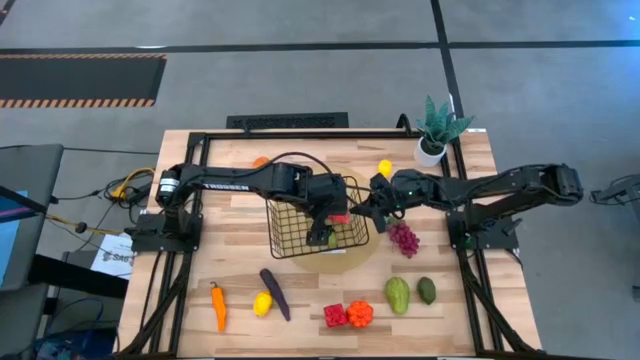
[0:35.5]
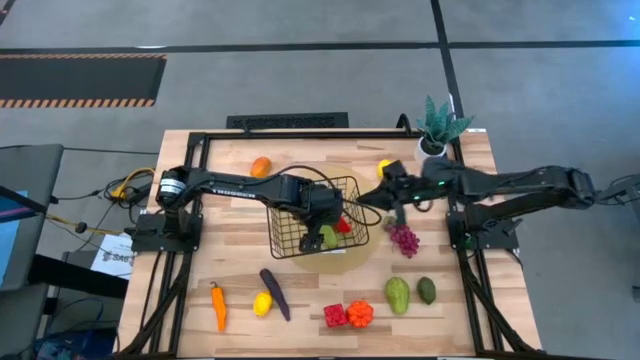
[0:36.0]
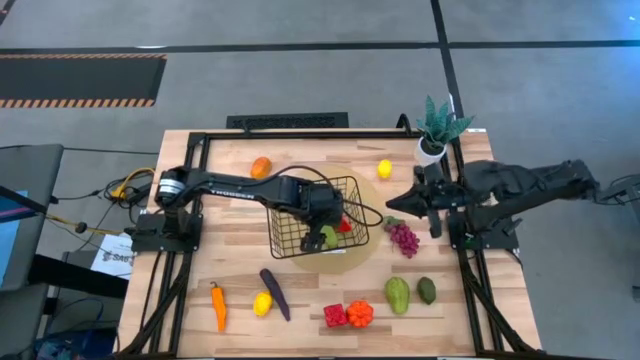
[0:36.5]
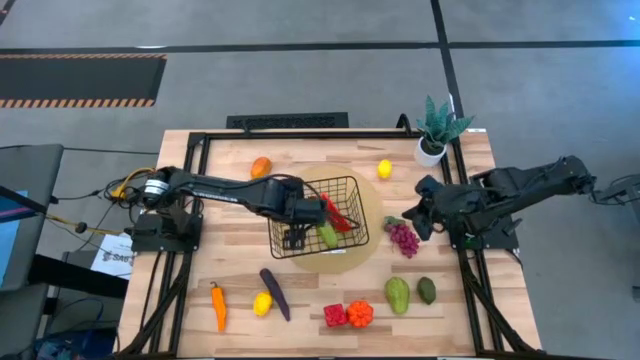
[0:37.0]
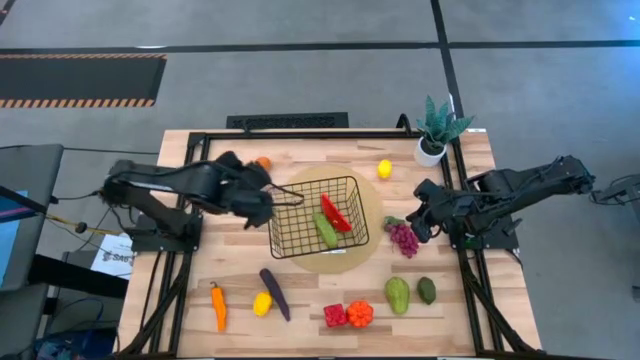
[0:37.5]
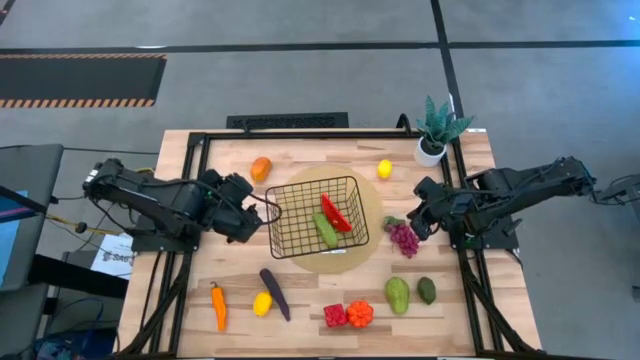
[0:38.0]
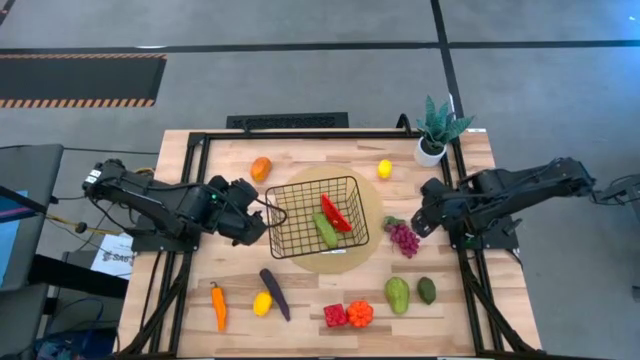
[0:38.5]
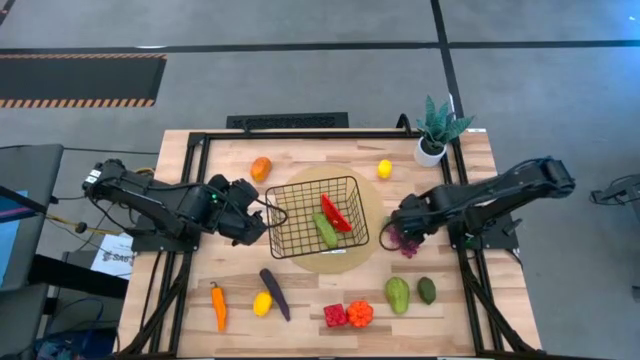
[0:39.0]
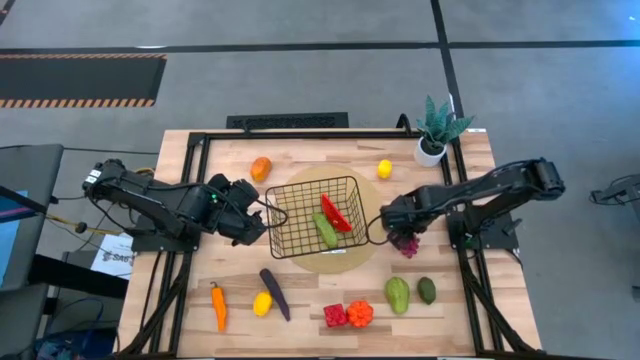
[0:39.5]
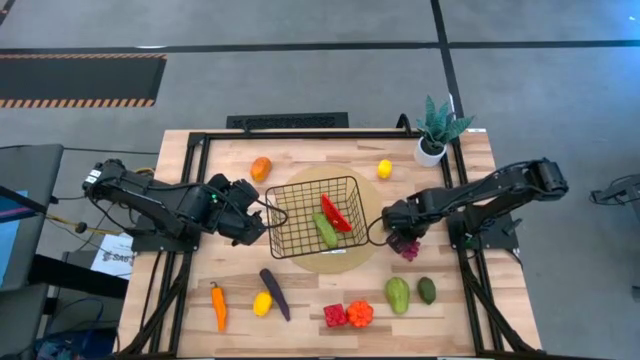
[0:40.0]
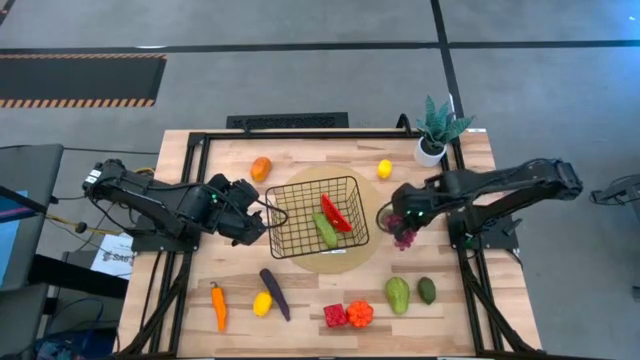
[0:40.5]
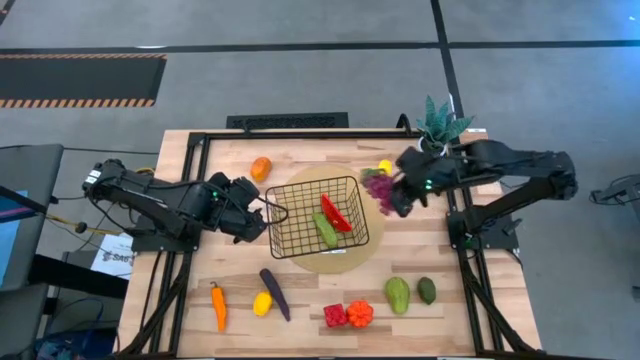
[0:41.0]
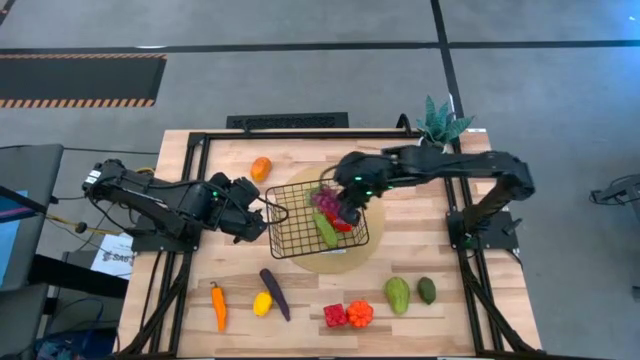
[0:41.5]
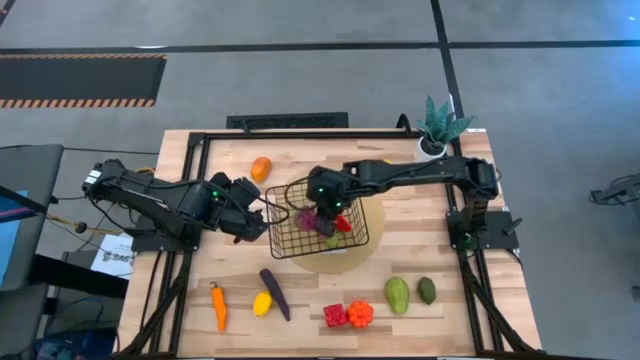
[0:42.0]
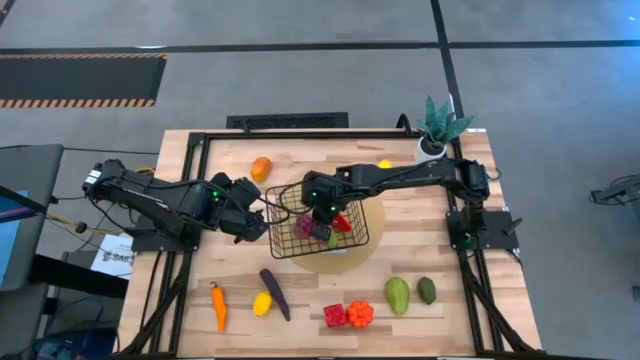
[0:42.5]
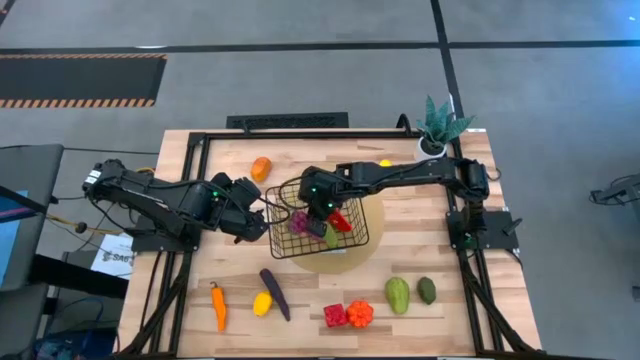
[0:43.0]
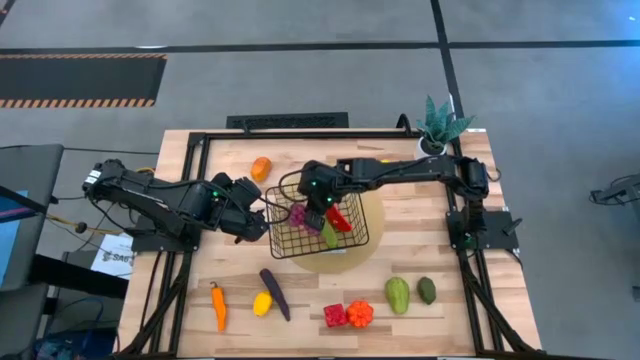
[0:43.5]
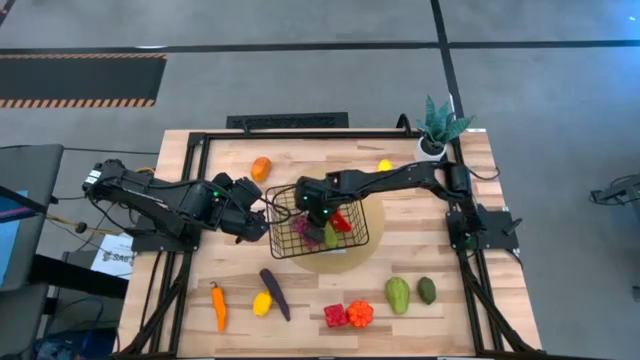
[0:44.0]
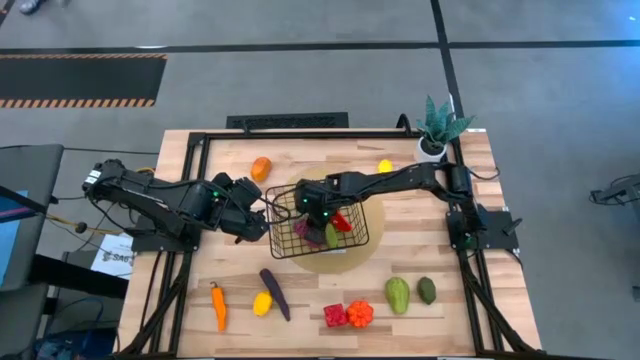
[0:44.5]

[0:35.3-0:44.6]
Task: Build produce basket
Put the purple grapes into the wire basket

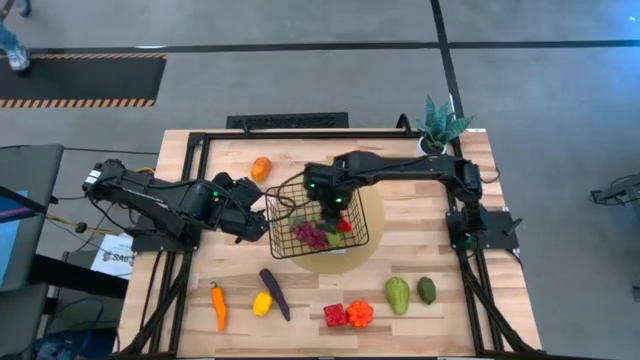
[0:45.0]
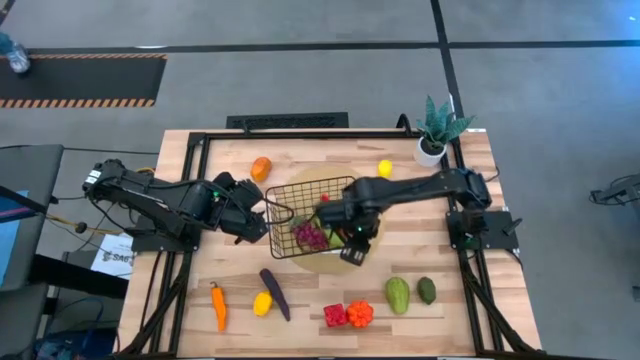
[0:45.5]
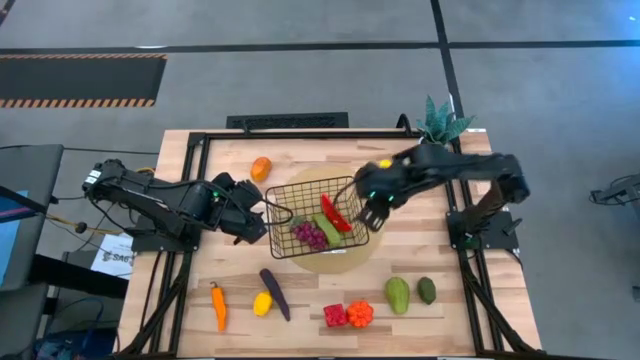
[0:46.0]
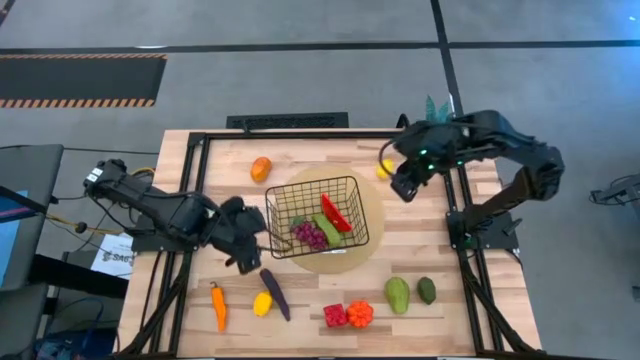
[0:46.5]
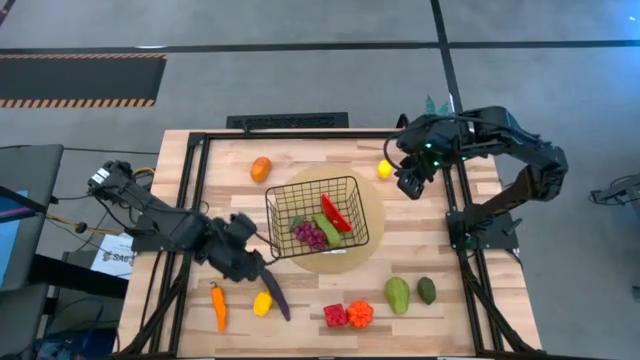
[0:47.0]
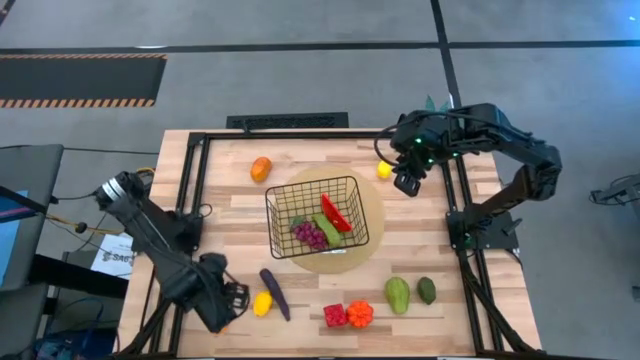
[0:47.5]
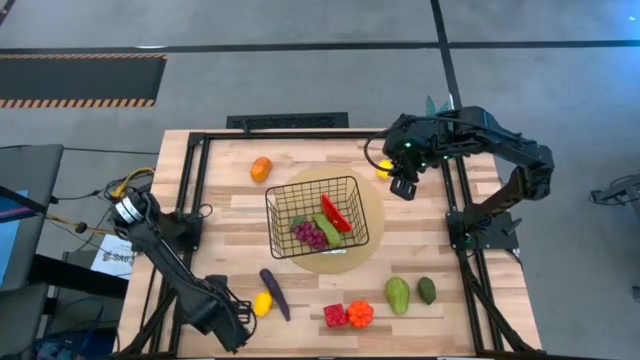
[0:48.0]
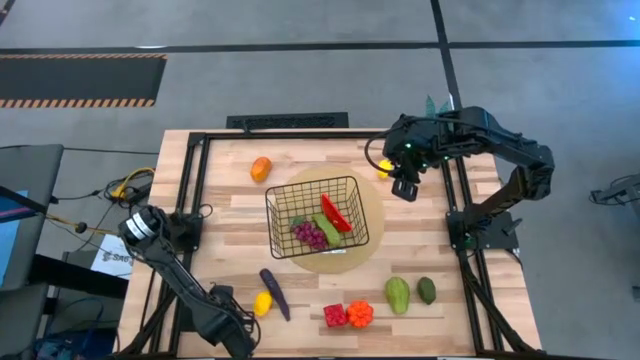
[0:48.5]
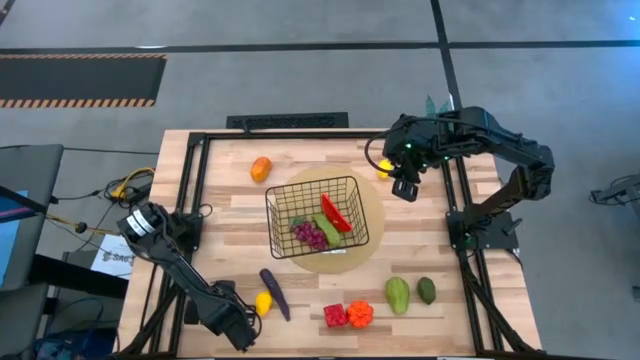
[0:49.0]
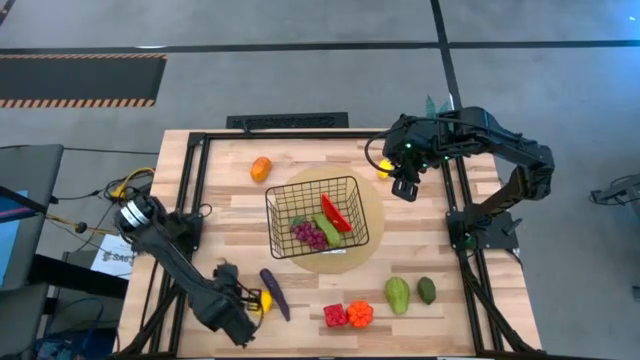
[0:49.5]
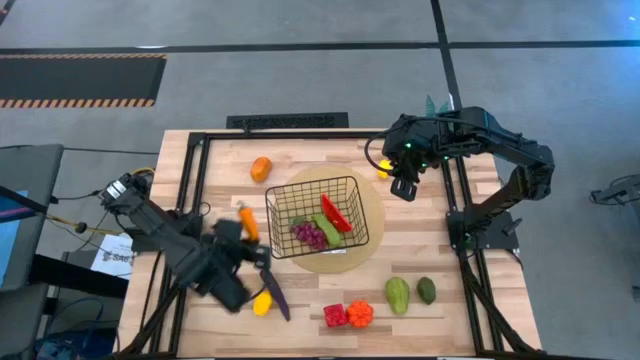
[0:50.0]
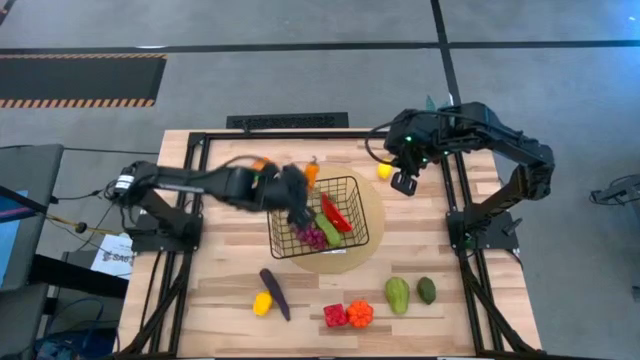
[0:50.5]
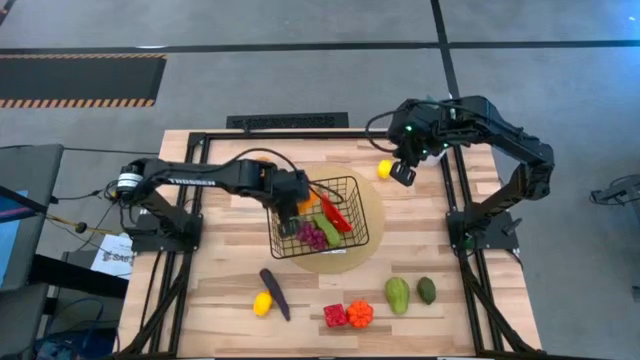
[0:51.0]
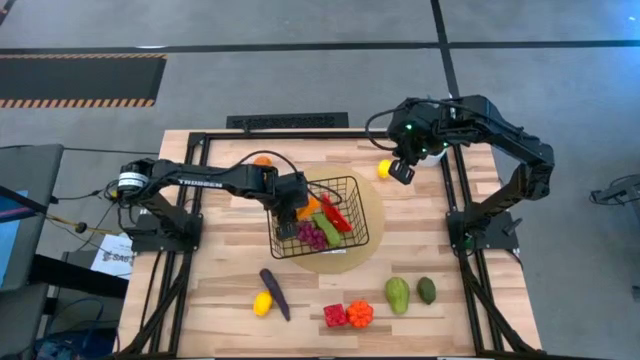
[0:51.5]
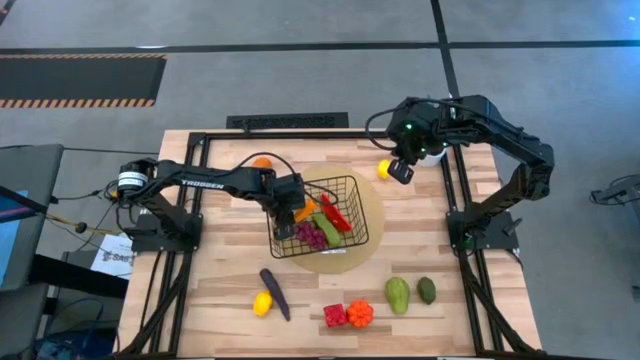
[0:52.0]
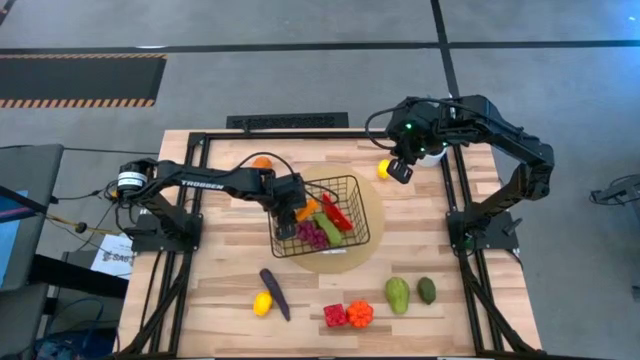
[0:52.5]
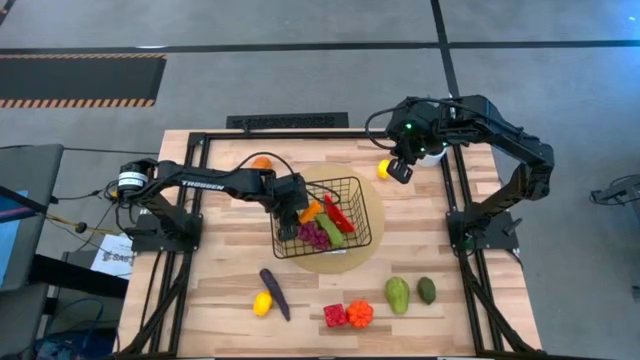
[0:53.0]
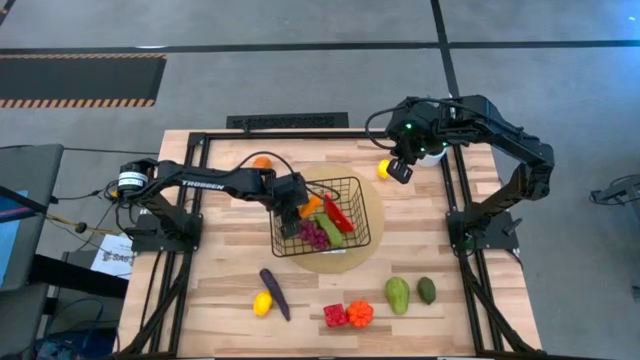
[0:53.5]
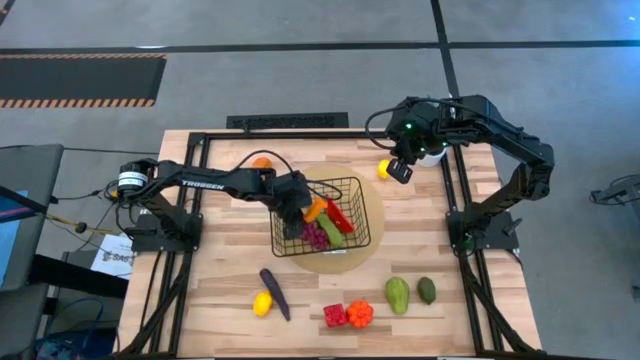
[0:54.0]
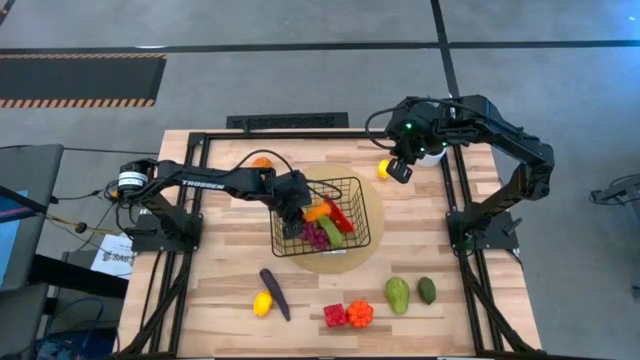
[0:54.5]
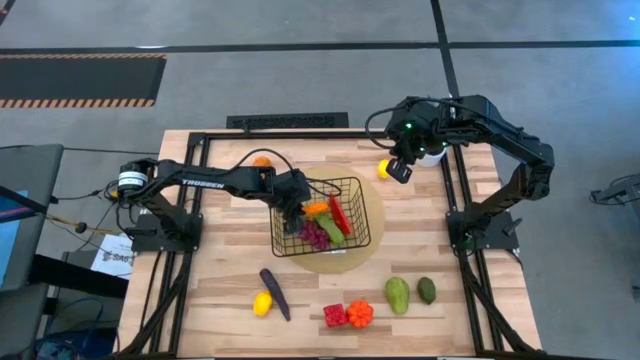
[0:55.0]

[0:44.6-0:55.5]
Put the orange chili pepper into the wire basket

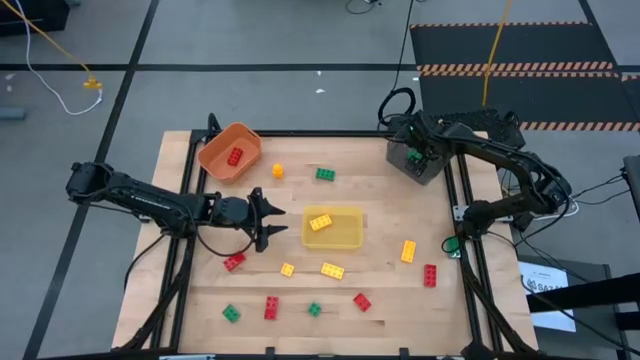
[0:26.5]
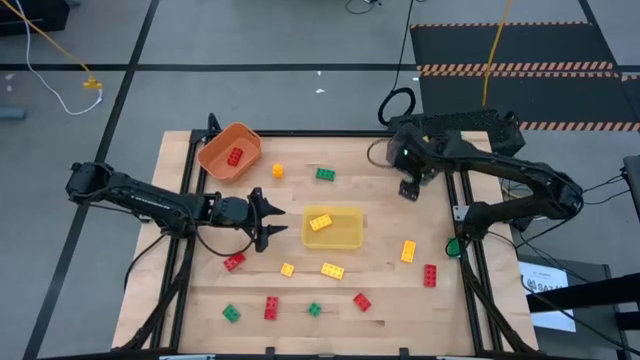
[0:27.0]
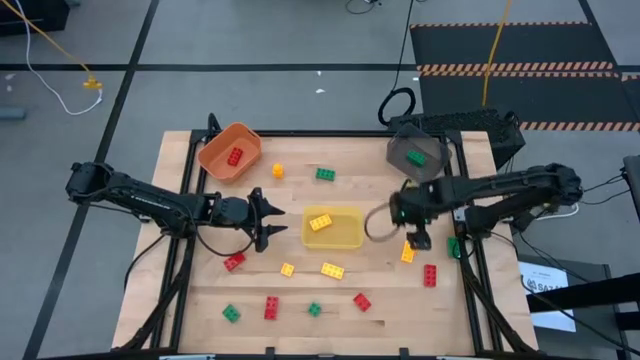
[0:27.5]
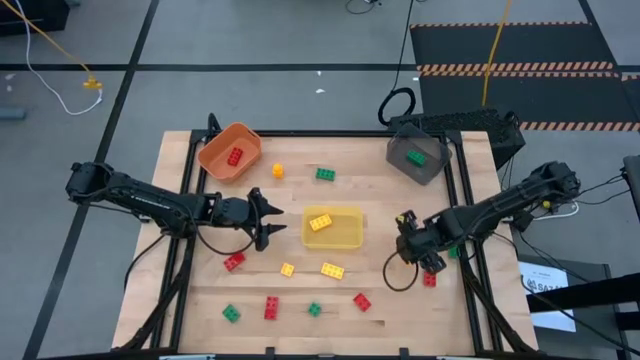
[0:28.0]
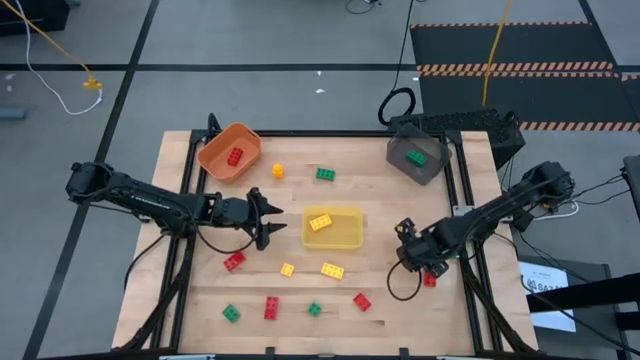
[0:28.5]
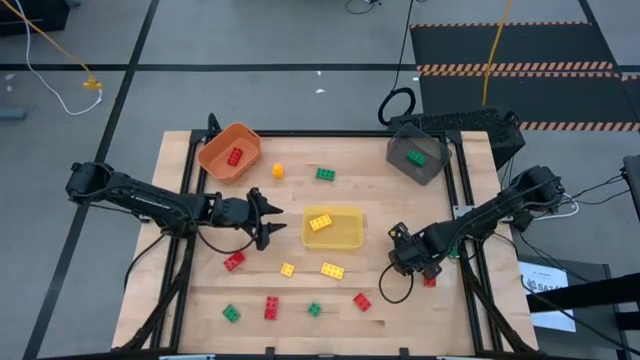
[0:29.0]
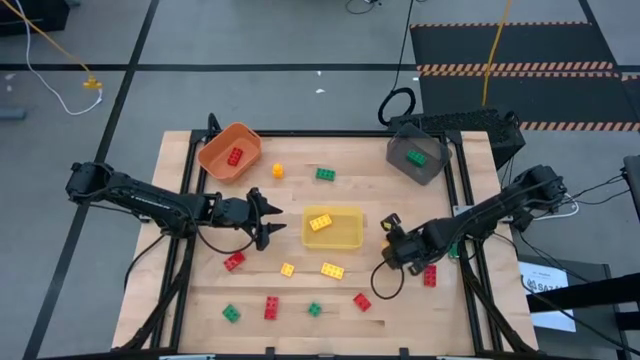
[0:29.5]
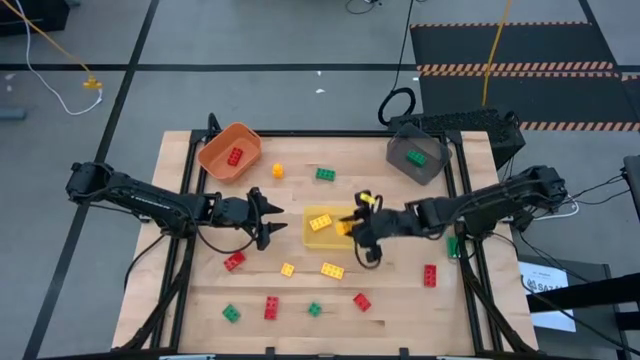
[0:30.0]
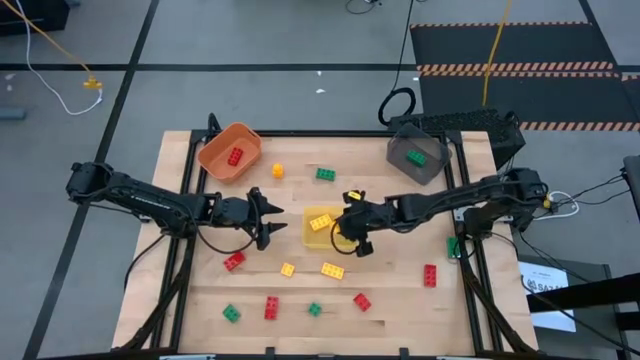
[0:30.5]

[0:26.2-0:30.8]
Task: Sort & place blocks by color
Put the bottom right yellow 8-stud game piece into the yellow bin
